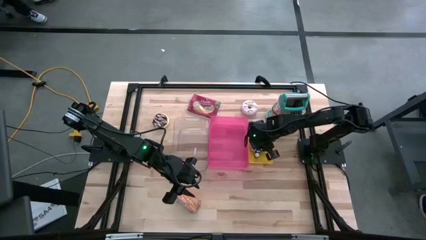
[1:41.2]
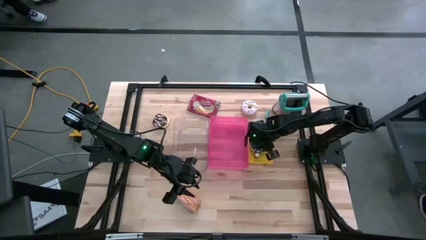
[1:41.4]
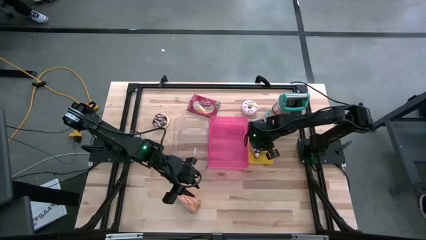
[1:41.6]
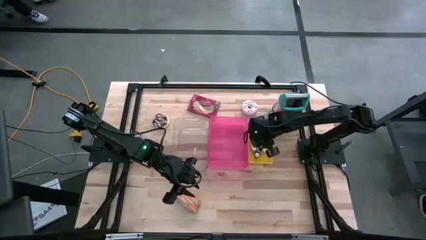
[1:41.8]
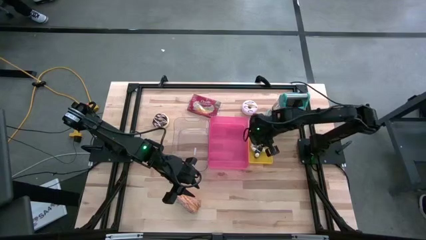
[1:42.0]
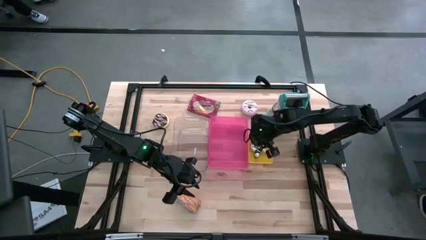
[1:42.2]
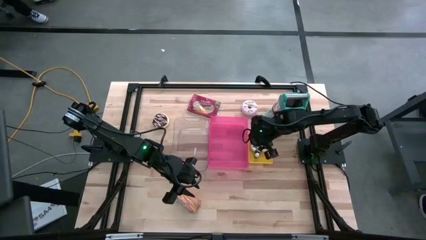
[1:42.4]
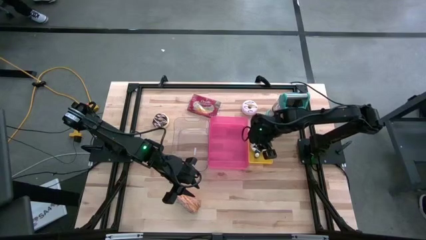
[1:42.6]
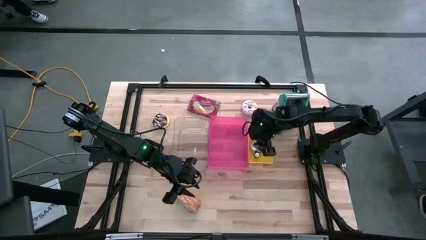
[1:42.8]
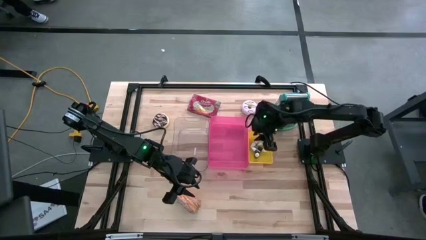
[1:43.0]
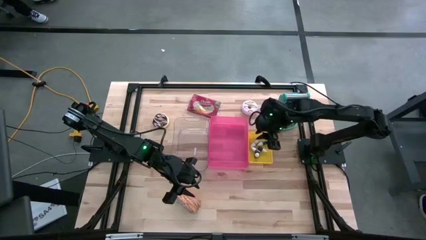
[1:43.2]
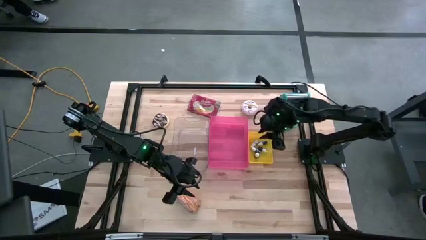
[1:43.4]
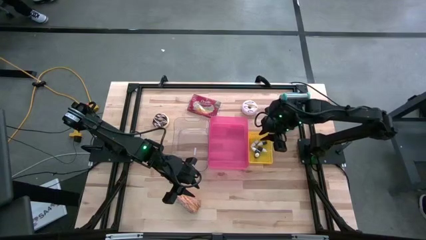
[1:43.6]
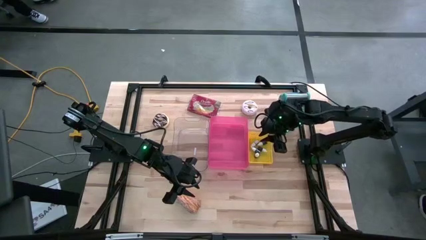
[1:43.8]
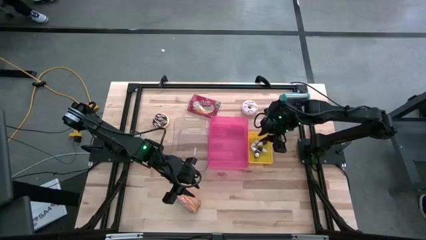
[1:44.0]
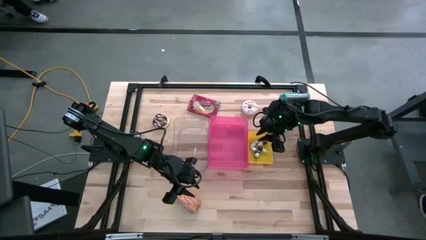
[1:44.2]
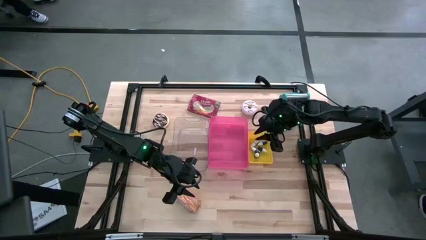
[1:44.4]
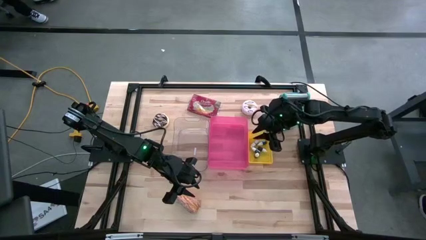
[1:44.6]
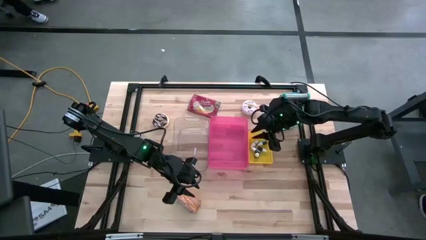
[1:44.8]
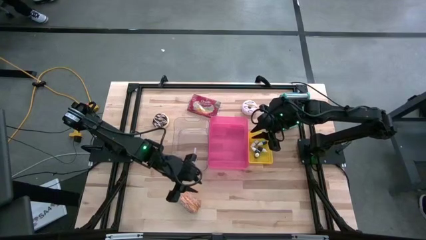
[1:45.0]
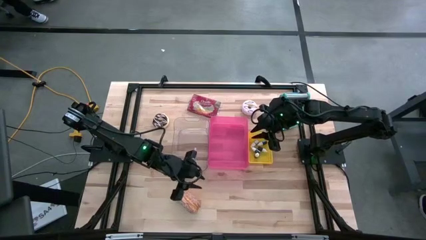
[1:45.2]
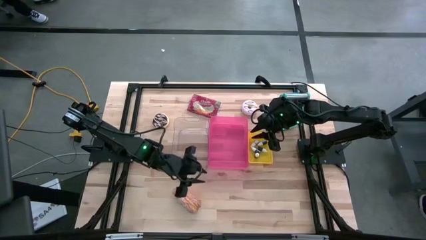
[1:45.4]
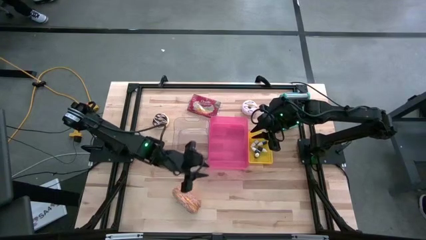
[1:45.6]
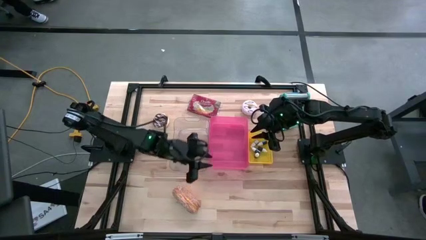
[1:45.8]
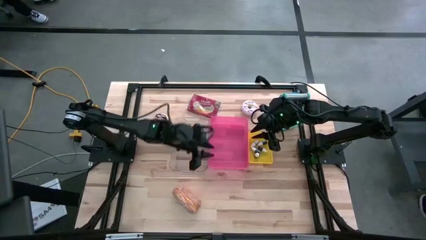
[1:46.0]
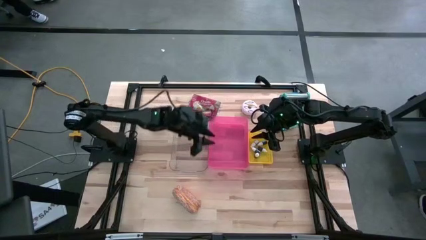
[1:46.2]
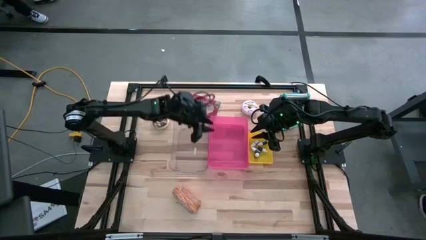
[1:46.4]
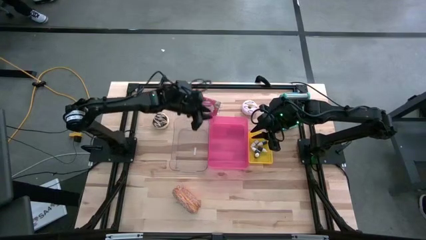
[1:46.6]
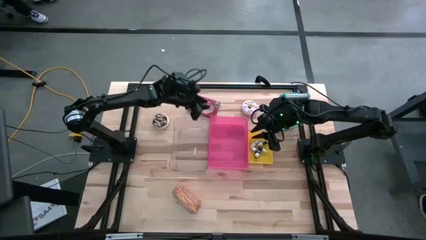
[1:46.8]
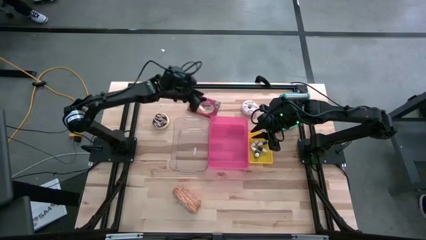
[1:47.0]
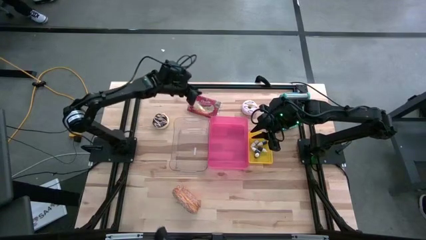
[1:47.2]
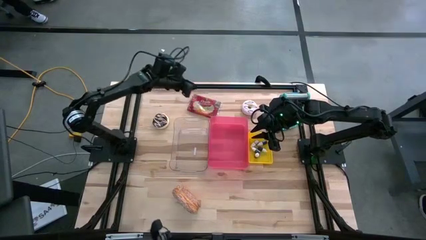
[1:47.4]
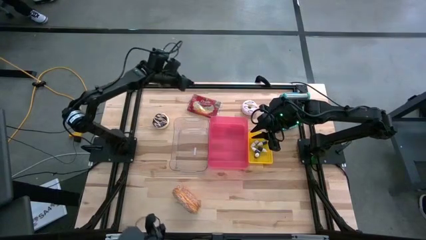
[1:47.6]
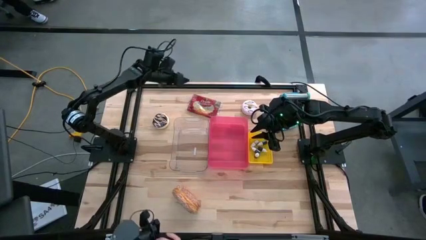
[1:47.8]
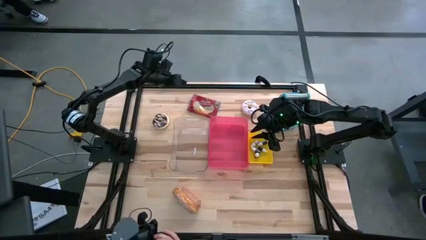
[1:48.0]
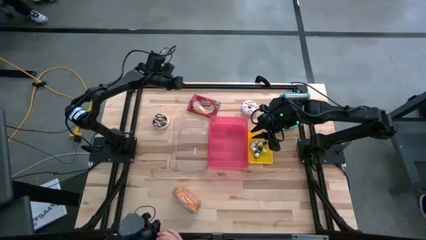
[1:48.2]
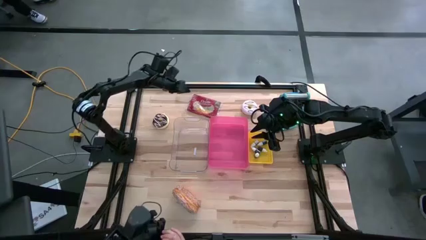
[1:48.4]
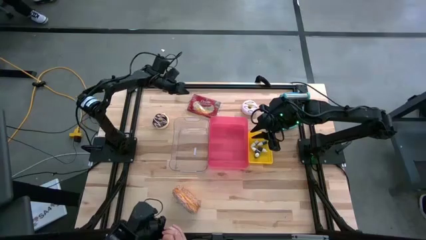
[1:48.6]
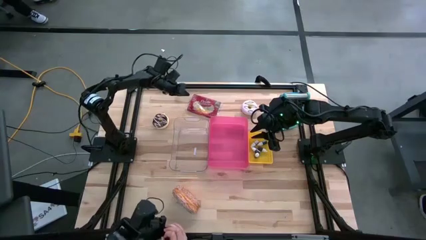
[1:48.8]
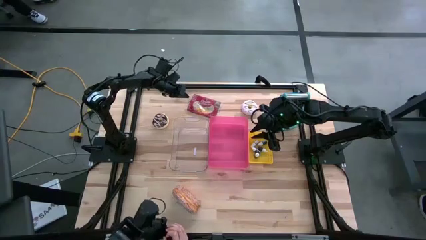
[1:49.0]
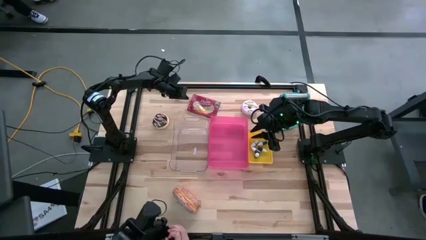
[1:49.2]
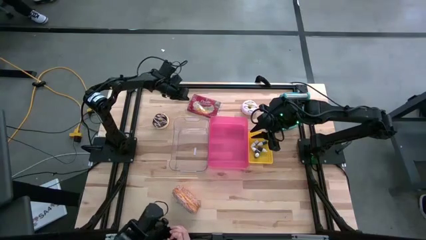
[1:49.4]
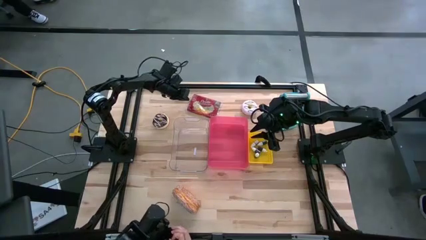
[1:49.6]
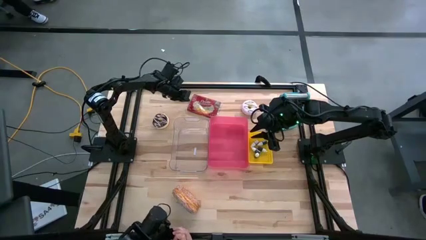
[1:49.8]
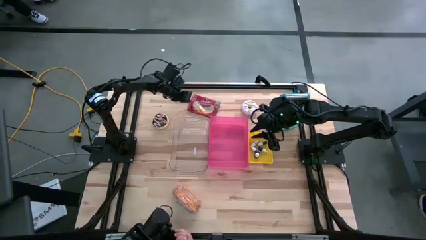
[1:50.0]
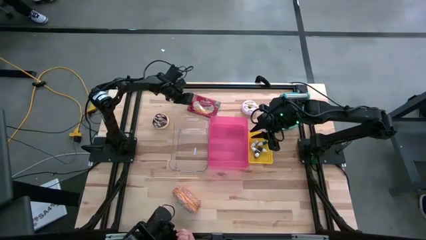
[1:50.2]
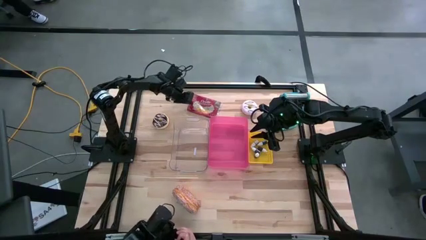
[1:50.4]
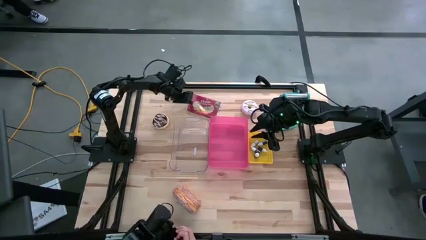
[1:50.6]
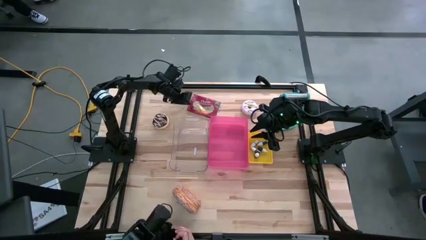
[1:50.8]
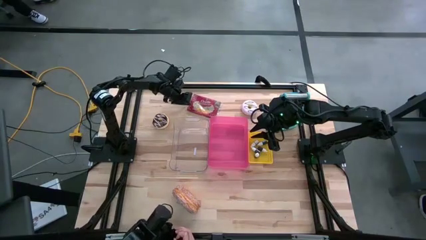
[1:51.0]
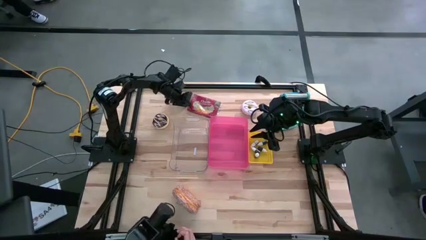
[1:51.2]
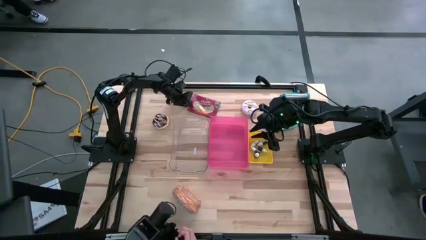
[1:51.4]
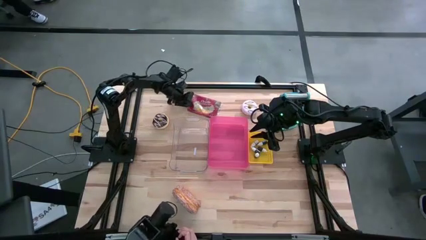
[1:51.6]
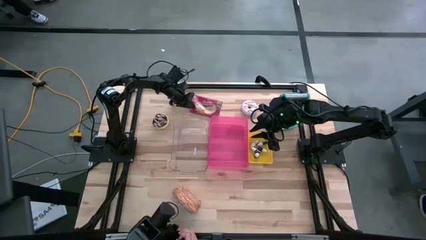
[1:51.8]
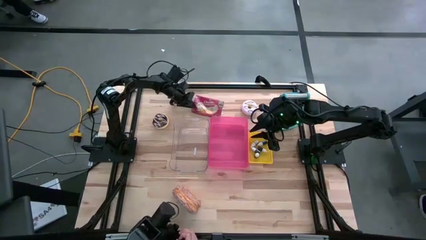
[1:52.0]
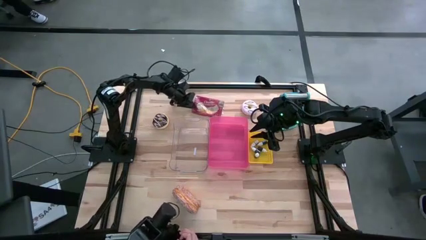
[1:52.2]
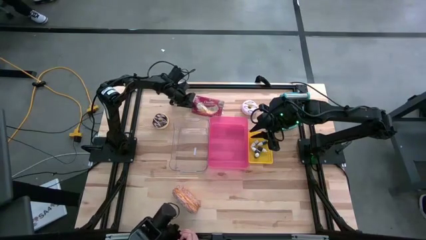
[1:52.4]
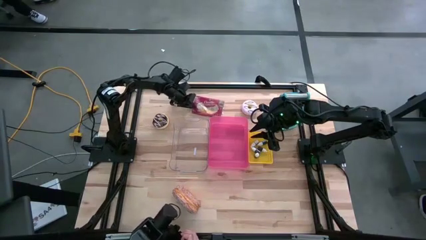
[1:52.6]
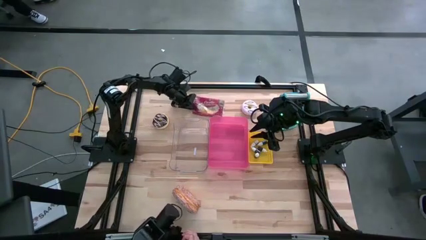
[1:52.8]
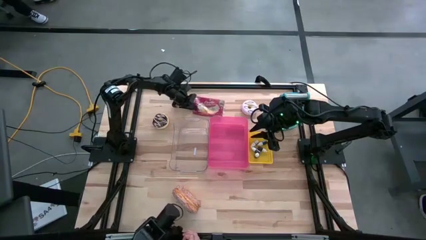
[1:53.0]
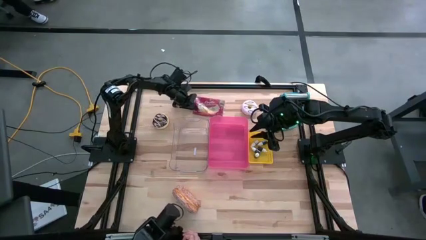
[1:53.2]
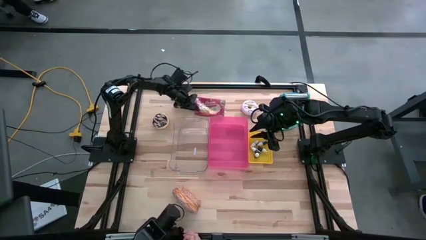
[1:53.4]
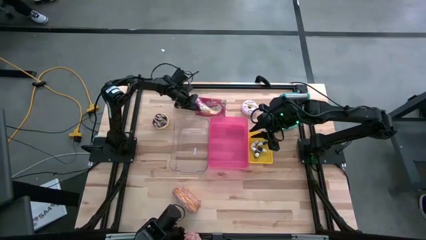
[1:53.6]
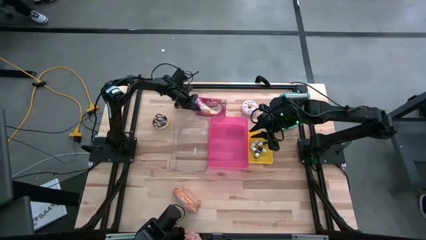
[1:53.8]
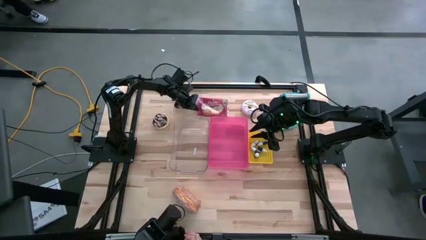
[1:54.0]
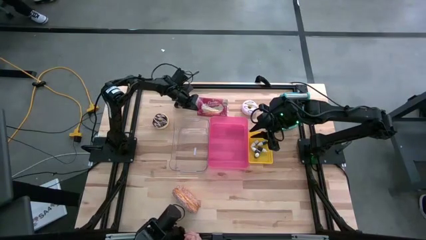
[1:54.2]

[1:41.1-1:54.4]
Put the popcorn bag into the pink bin
